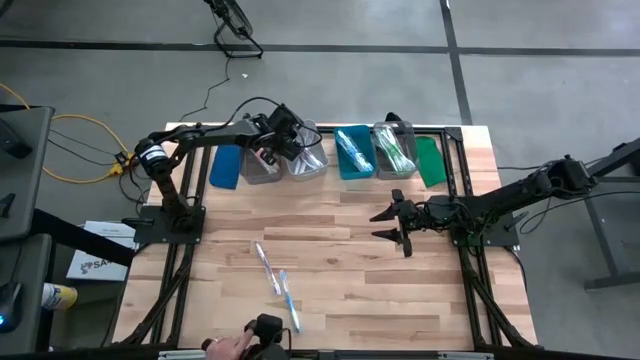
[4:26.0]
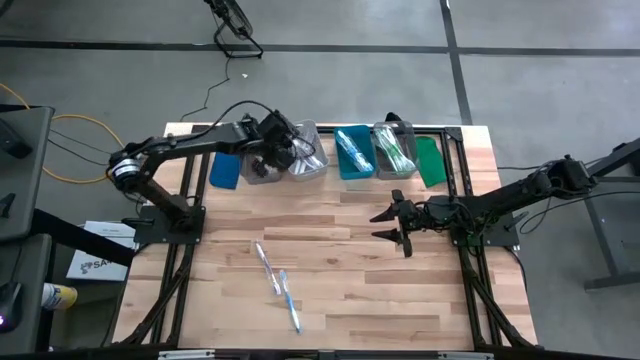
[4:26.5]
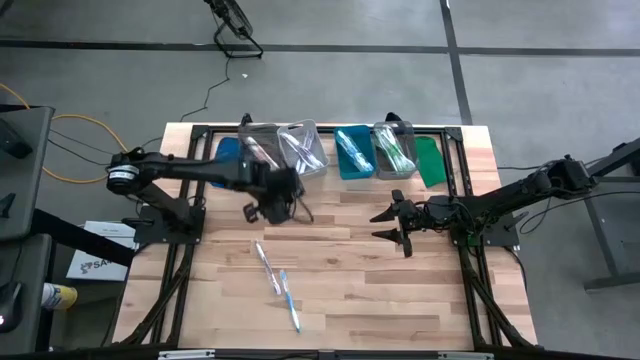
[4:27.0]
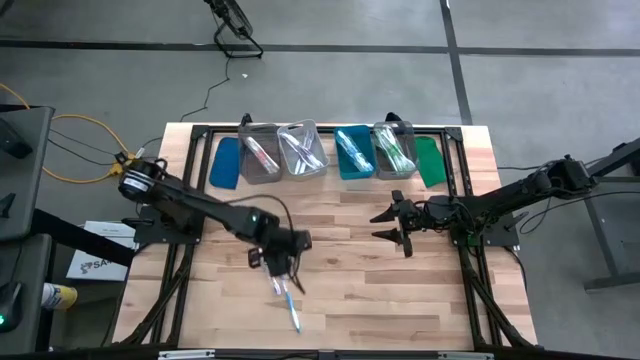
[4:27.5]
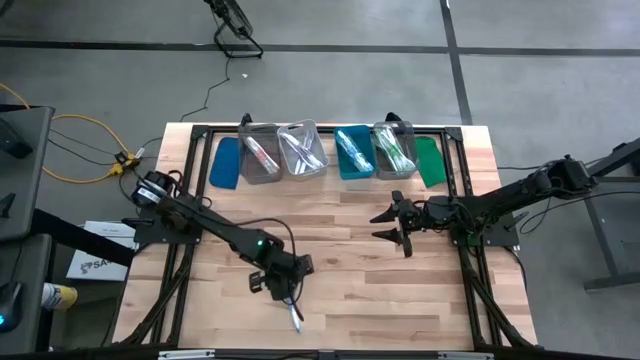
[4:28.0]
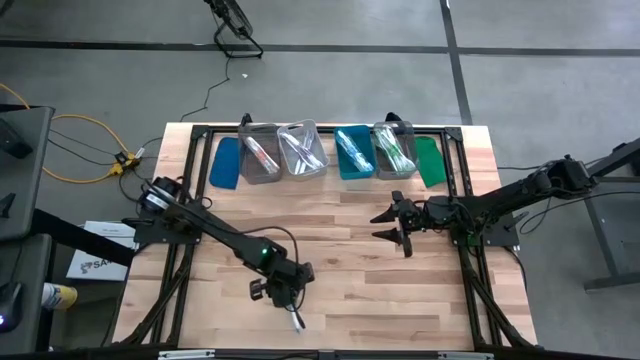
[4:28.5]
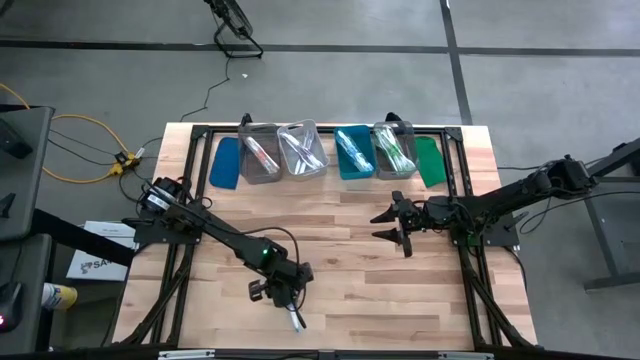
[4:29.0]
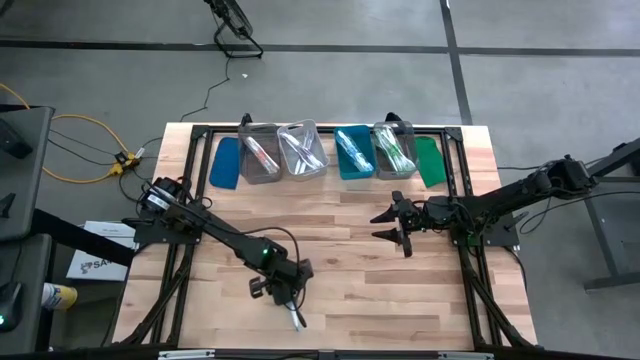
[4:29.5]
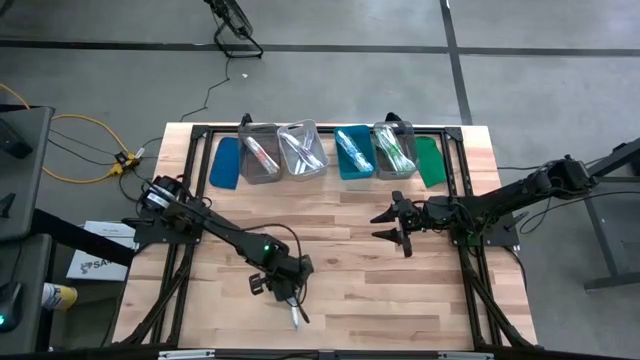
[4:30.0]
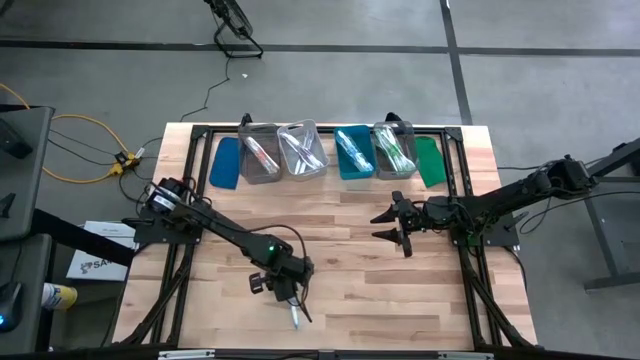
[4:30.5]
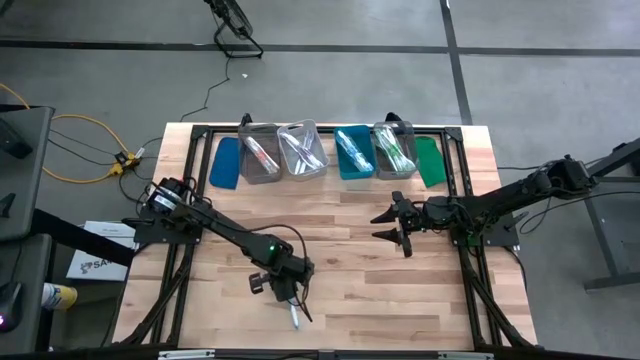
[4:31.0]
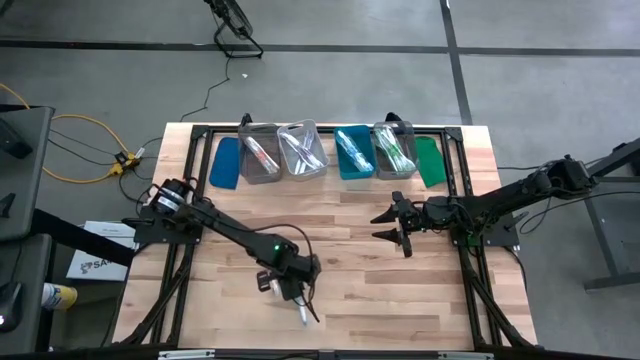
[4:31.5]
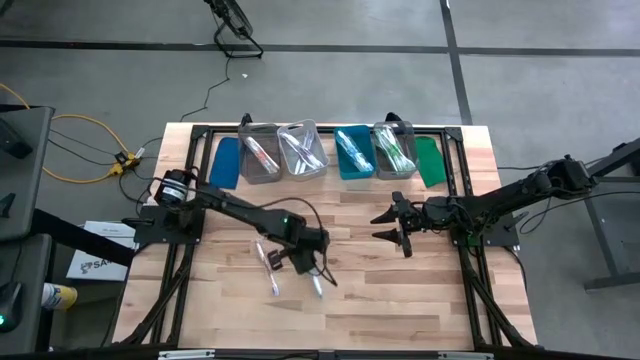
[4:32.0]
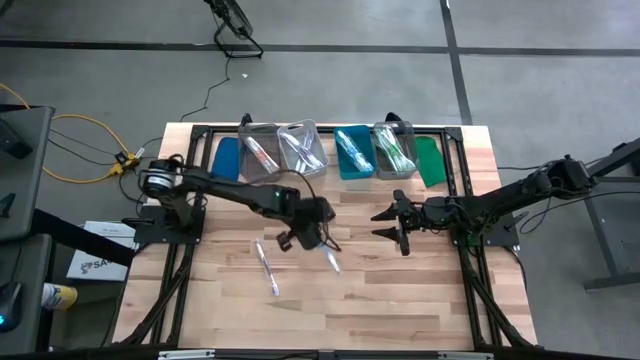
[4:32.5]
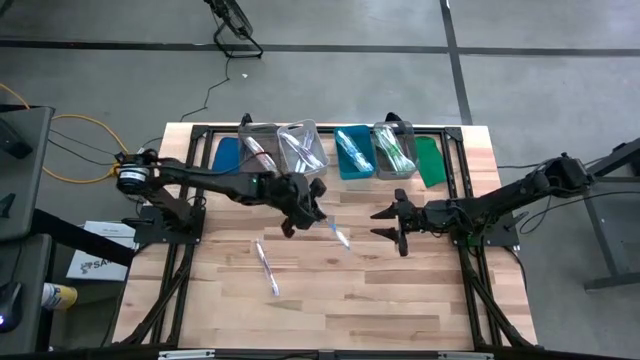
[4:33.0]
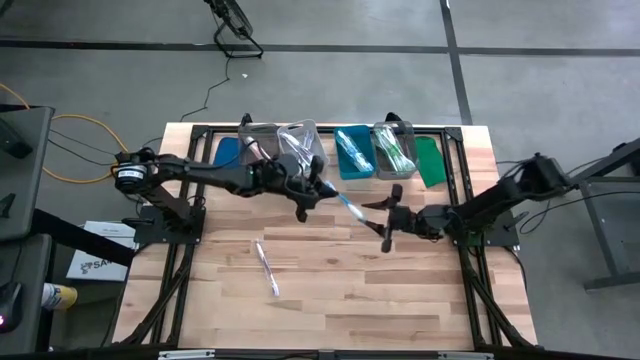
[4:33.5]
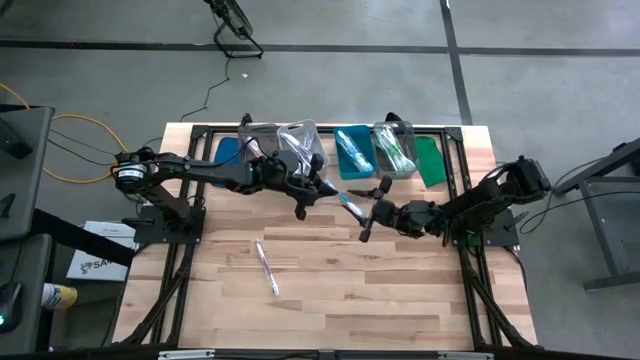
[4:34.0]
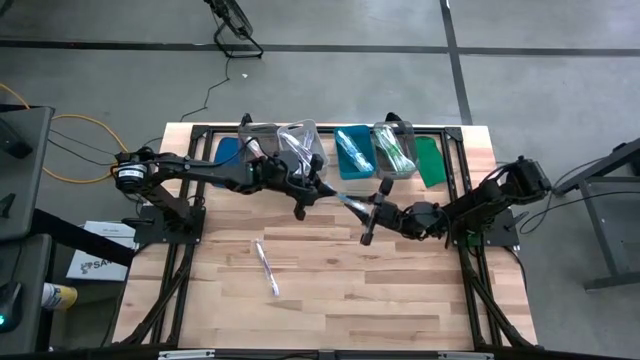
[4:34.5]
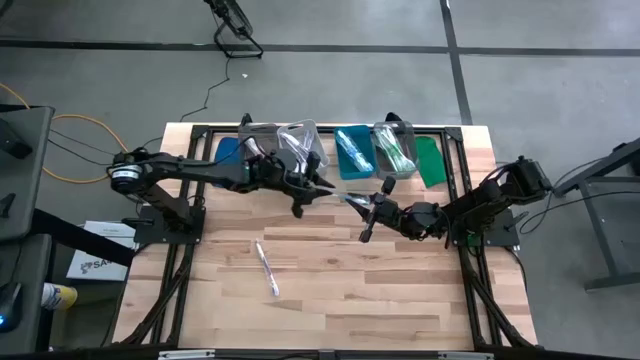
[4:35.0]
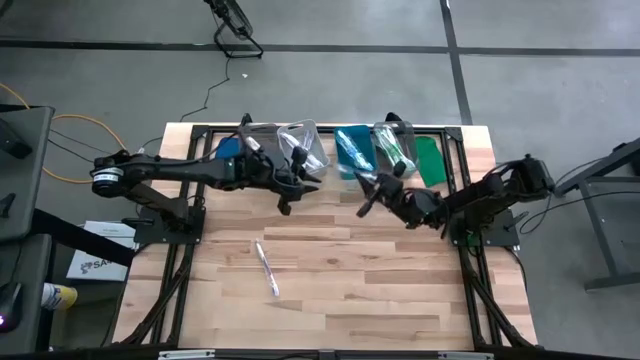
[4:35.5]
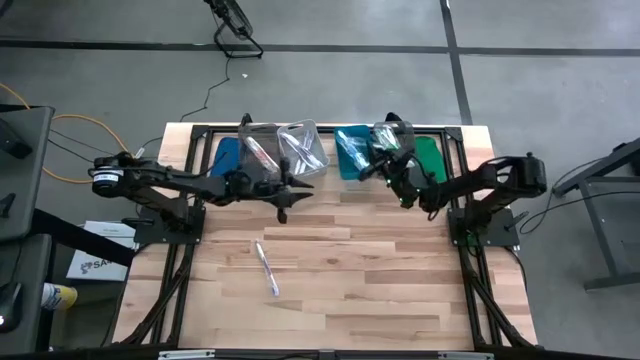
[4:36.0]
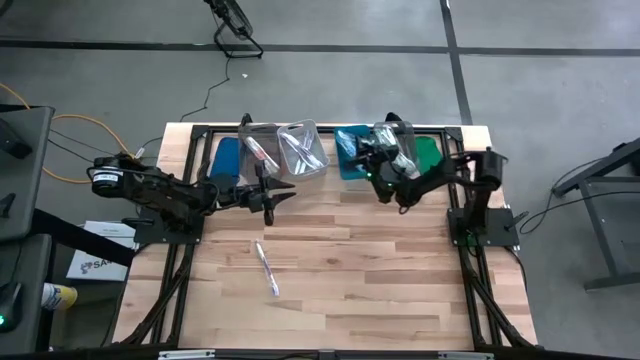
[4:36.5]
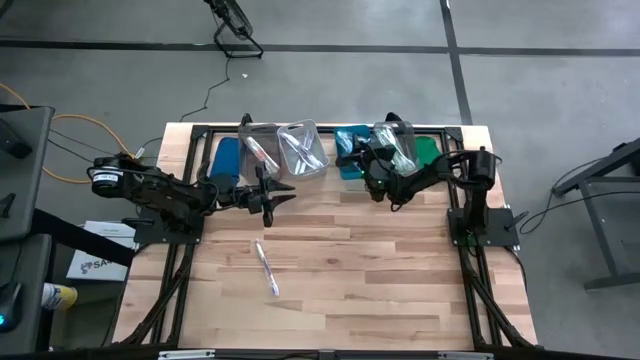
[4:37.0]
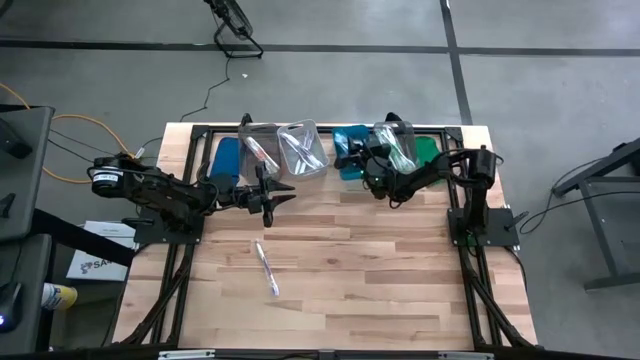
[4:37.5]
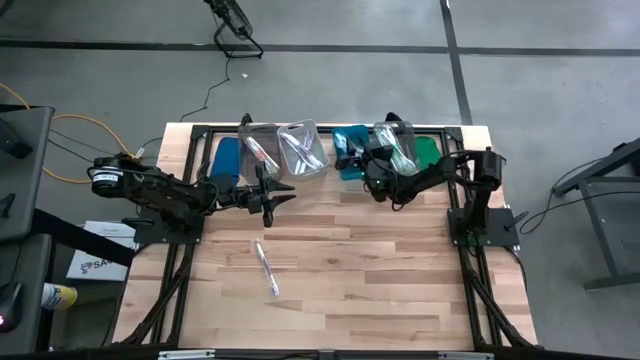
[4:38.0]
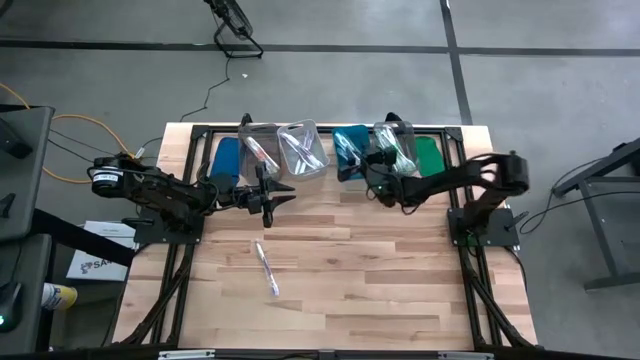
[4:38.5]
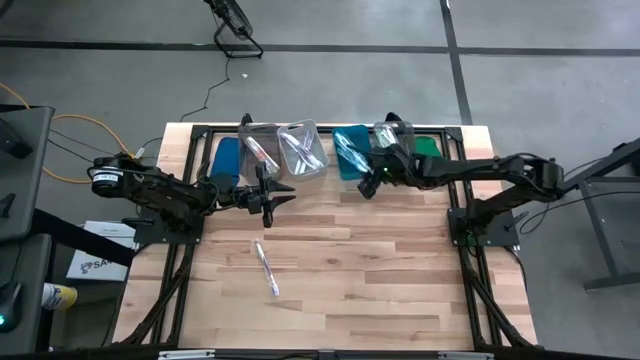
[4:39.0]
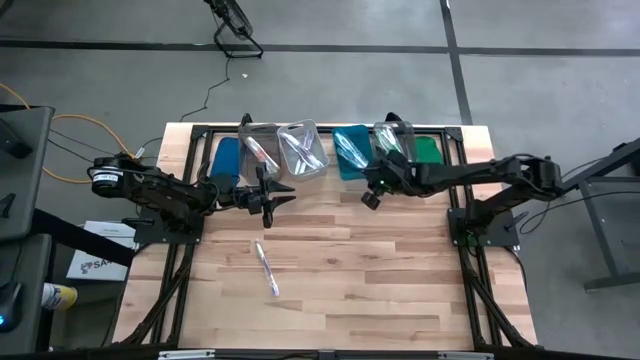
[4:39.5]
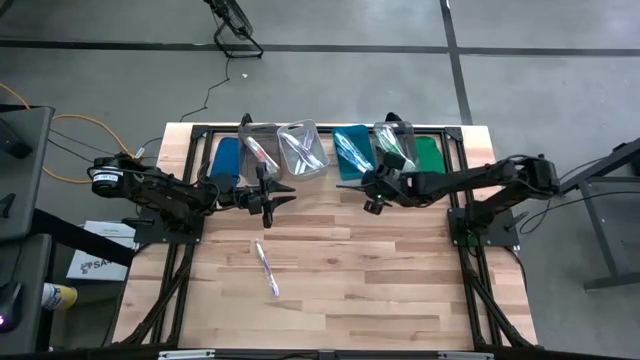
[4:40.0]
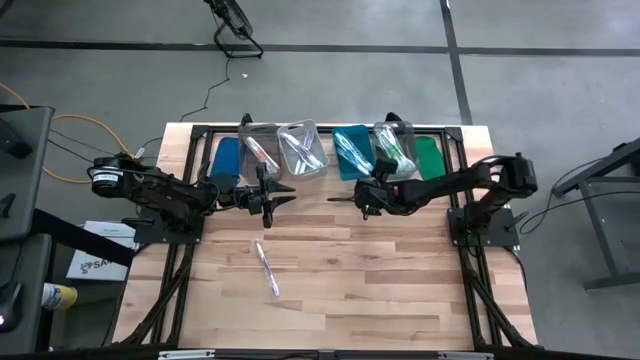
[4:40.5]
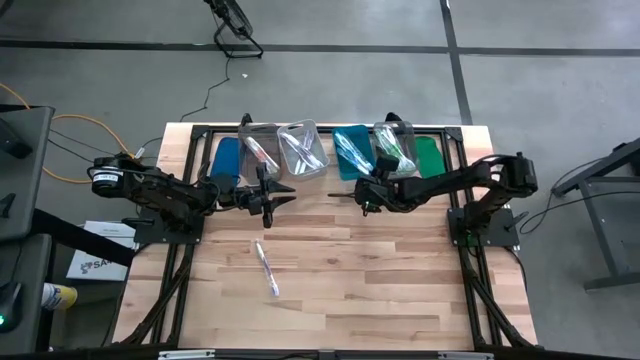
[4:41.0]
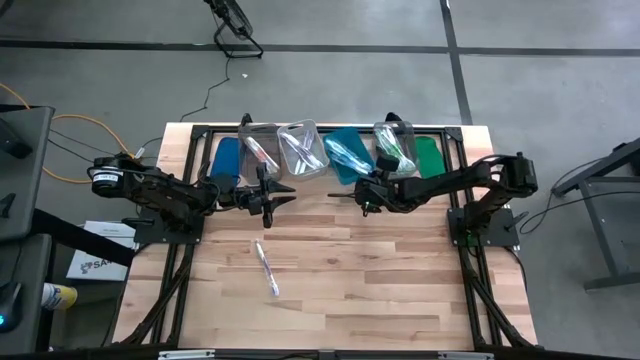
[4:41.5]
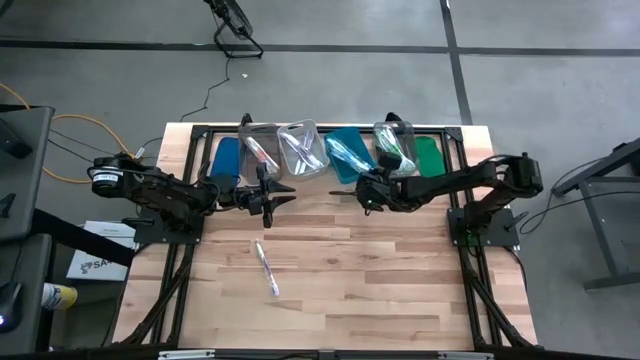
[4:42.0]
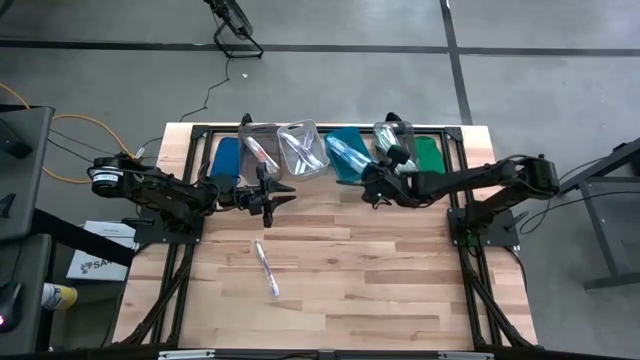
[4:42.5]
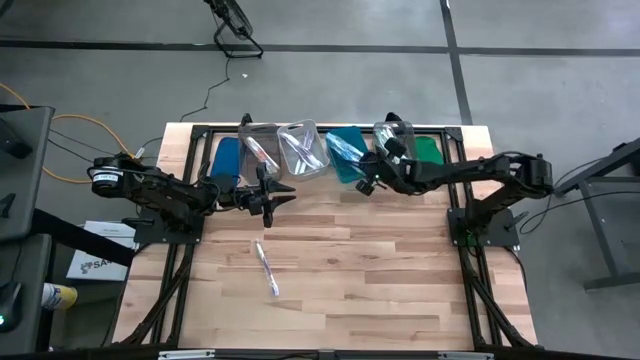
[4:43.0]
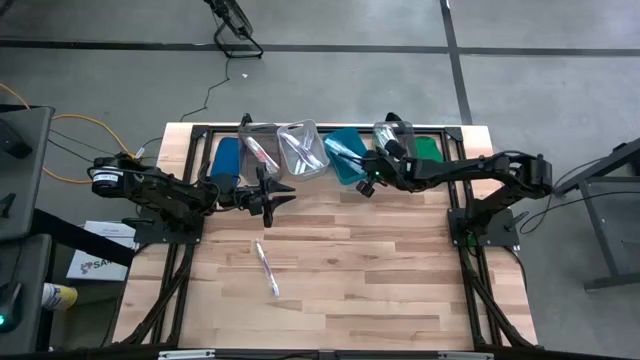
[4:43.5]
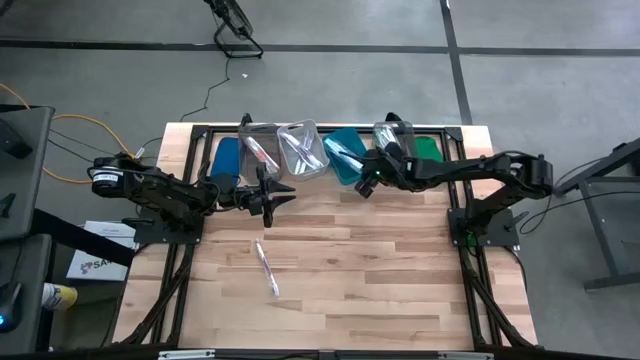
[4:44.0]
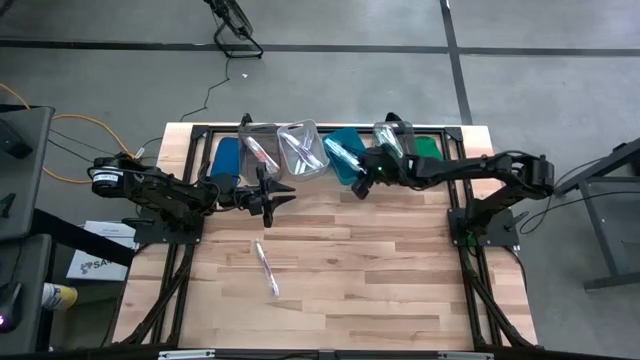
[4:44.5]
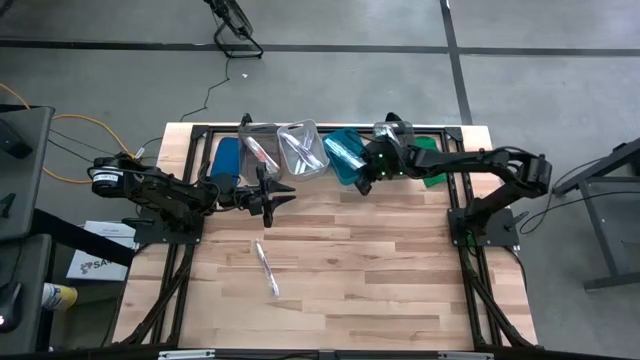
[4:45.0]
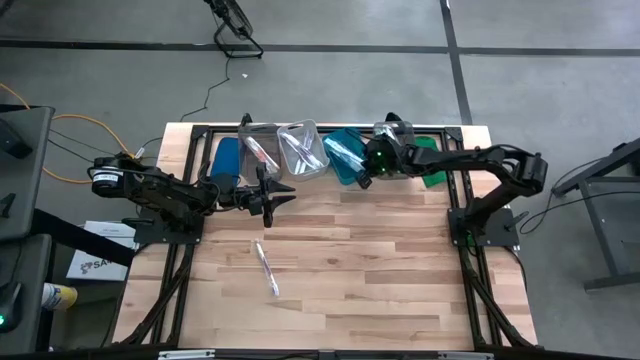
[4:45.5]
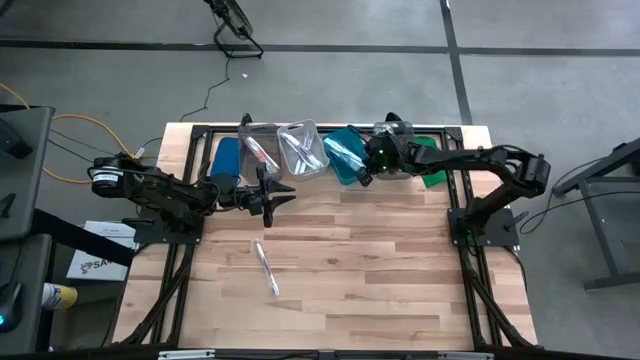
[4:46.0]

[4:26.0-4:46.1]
Task: Pick & Place Toothbrushes
Put the blue toothbrush into the blue bin

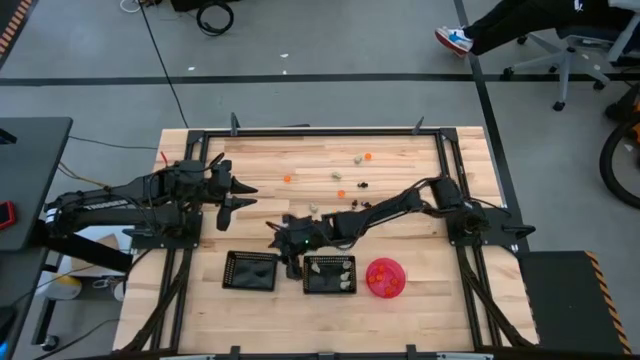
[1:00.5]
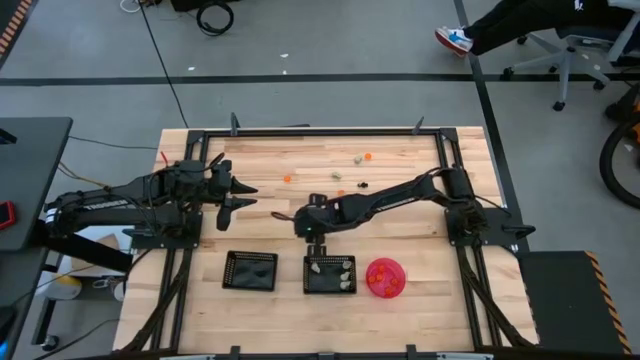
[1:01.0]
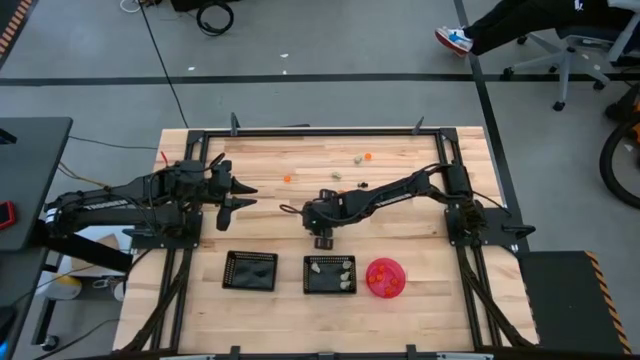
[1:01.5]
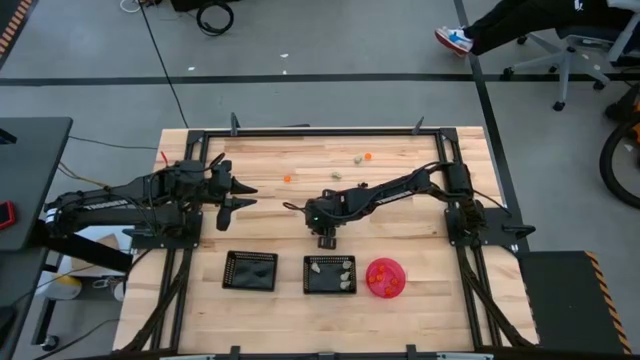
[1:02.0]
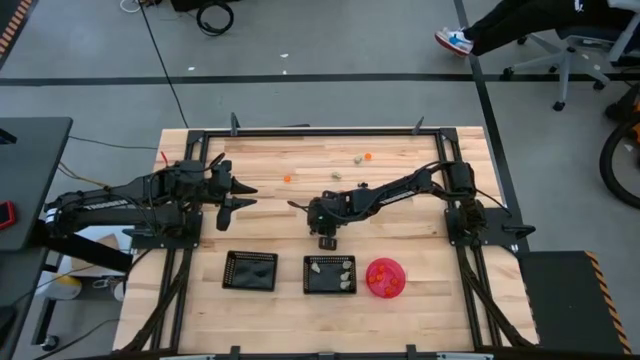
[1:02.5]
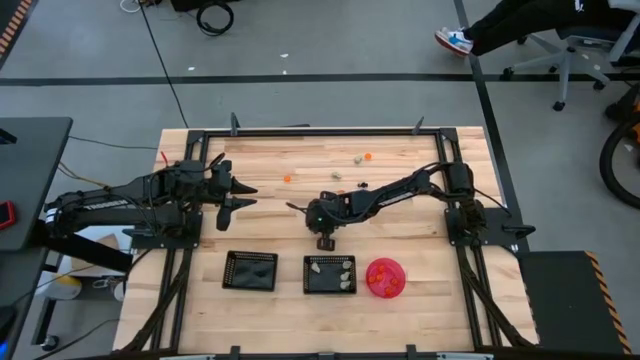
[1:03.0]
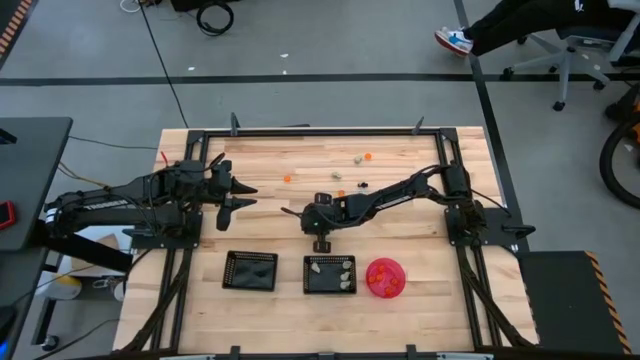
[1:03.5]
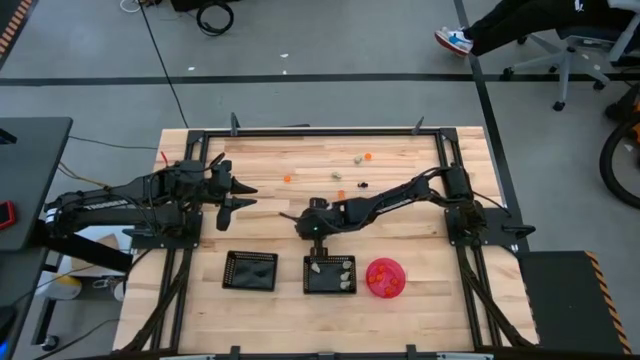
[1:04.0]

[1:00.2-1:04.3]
Task: Sort Halloween decoration
Put the black skeleton toy into the left black bin
